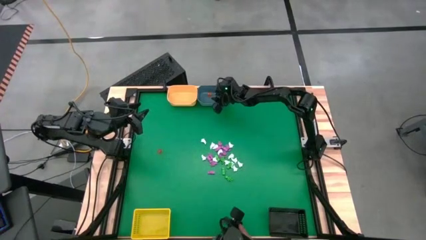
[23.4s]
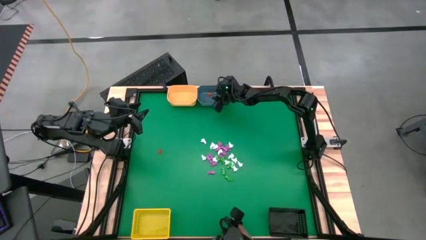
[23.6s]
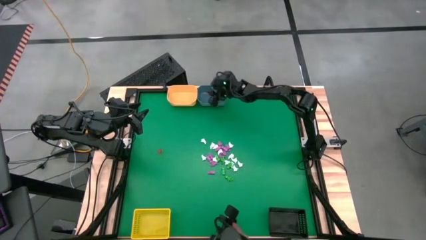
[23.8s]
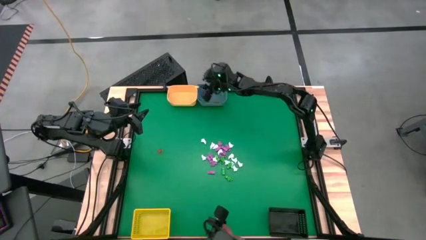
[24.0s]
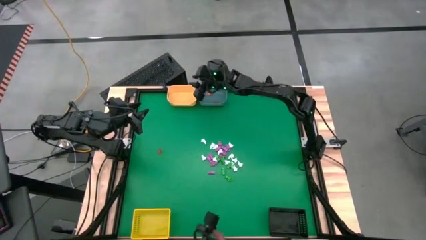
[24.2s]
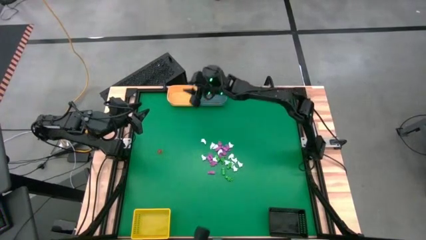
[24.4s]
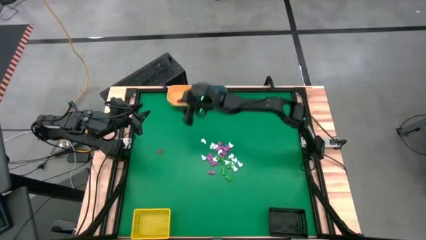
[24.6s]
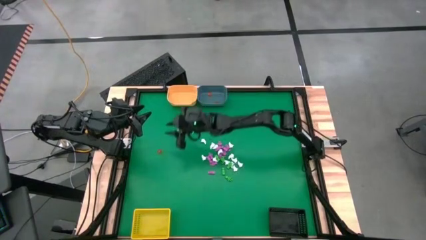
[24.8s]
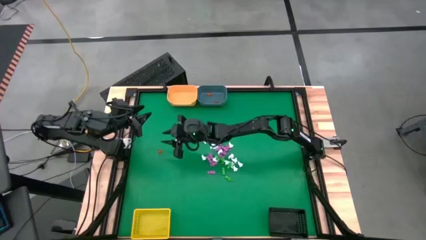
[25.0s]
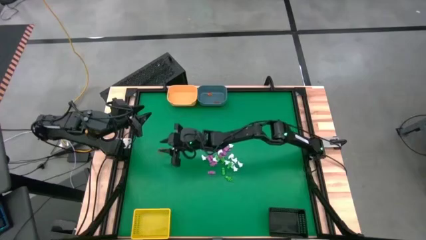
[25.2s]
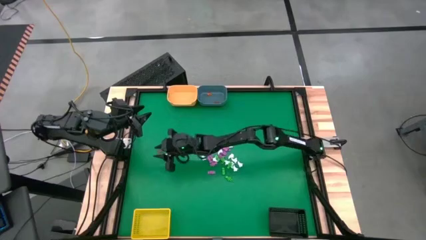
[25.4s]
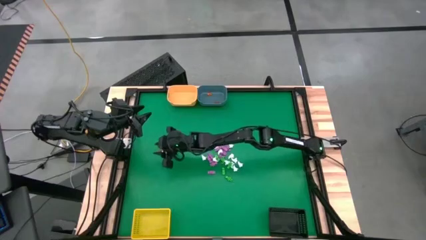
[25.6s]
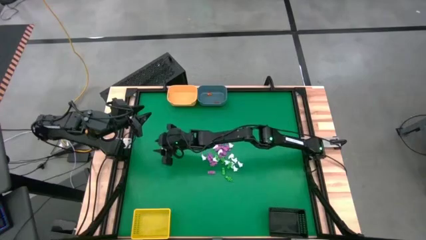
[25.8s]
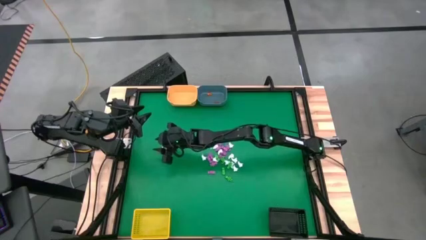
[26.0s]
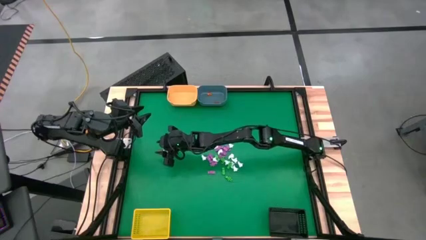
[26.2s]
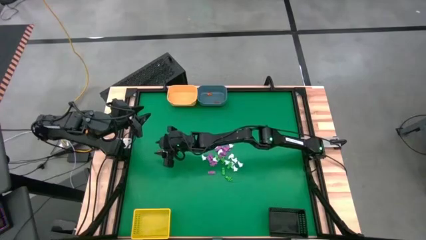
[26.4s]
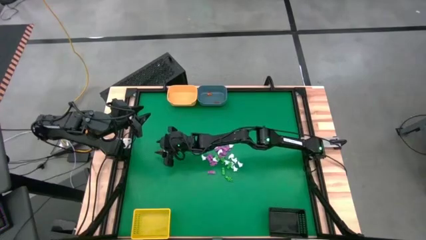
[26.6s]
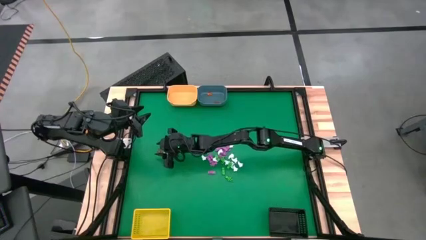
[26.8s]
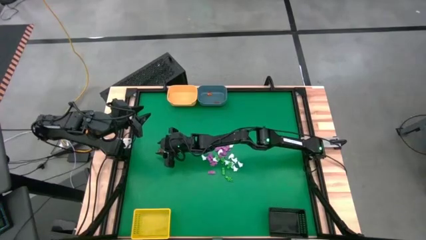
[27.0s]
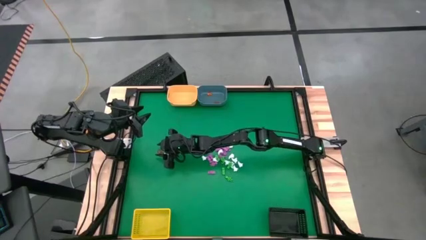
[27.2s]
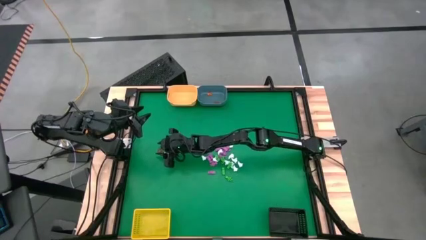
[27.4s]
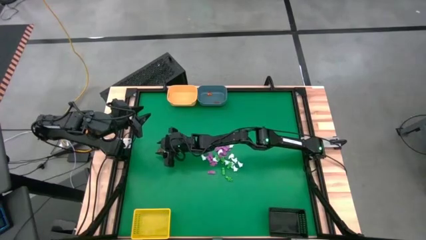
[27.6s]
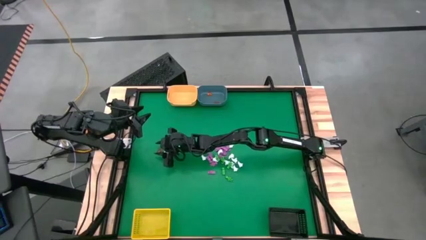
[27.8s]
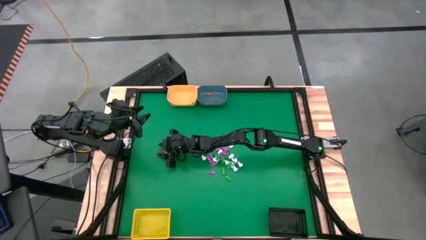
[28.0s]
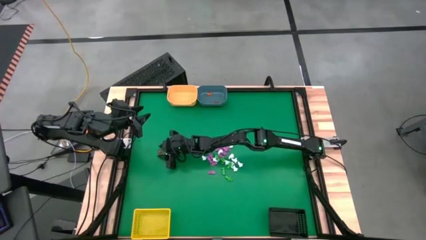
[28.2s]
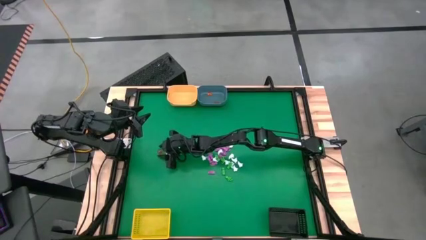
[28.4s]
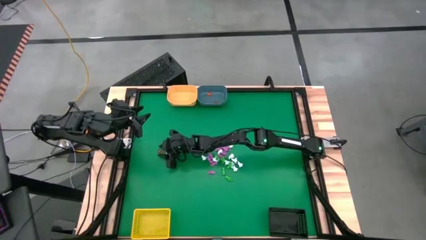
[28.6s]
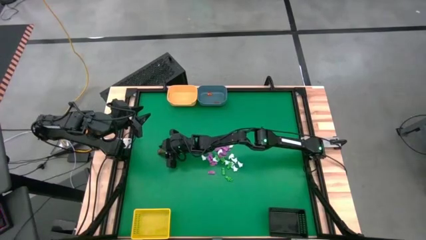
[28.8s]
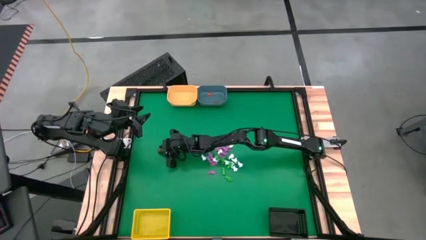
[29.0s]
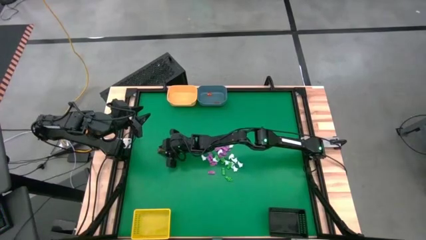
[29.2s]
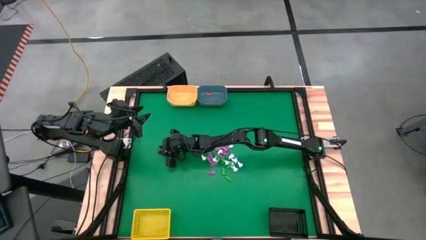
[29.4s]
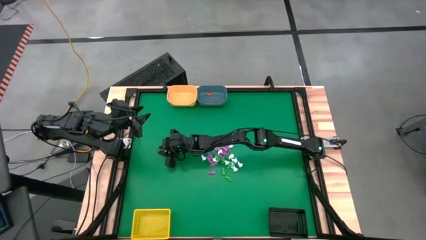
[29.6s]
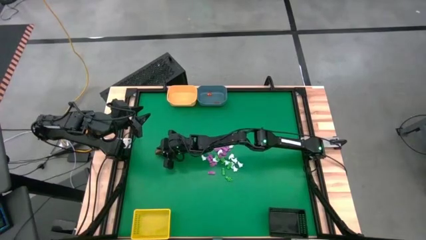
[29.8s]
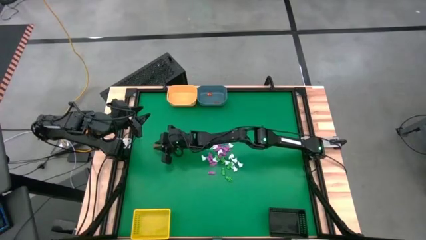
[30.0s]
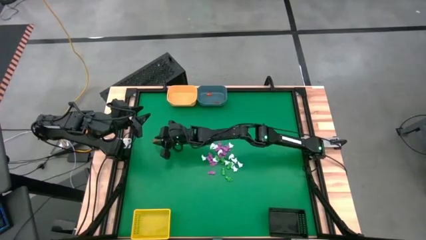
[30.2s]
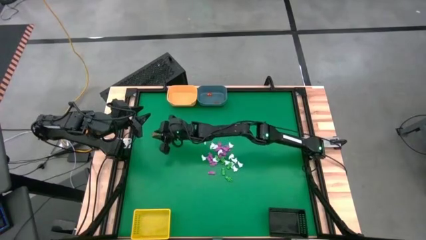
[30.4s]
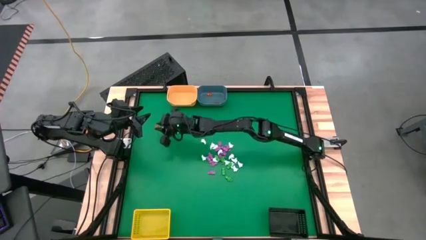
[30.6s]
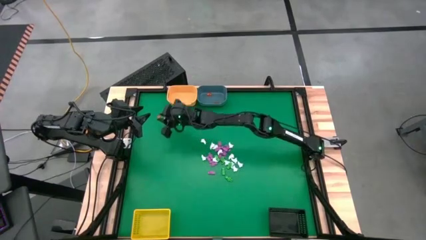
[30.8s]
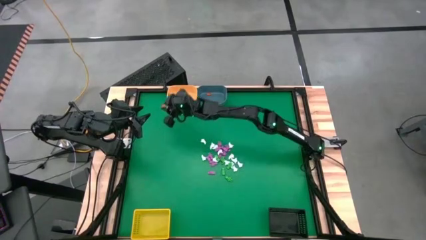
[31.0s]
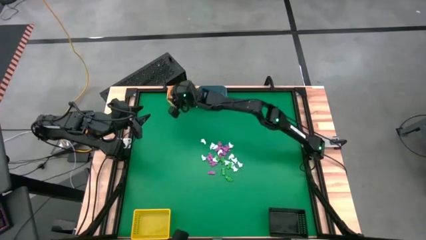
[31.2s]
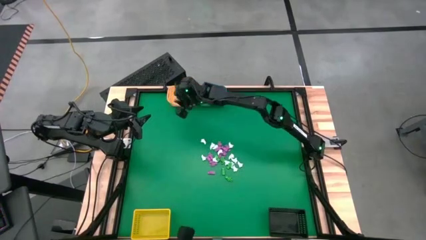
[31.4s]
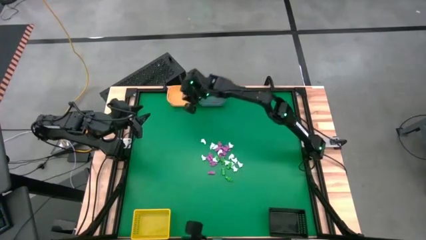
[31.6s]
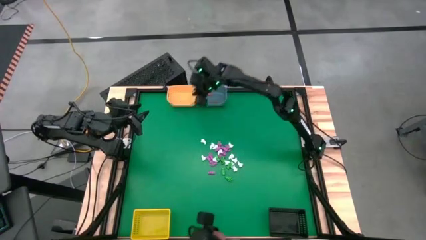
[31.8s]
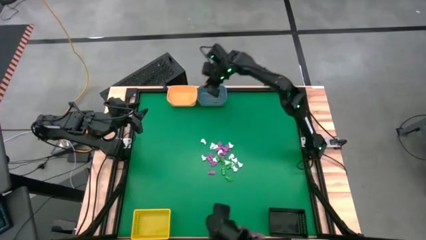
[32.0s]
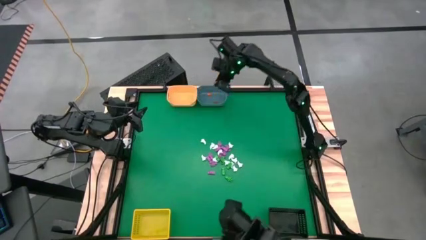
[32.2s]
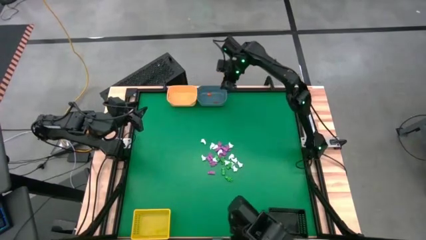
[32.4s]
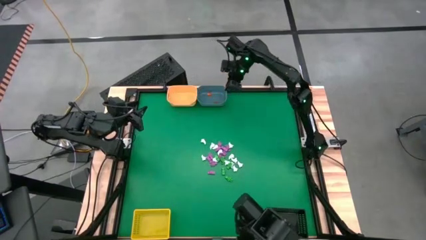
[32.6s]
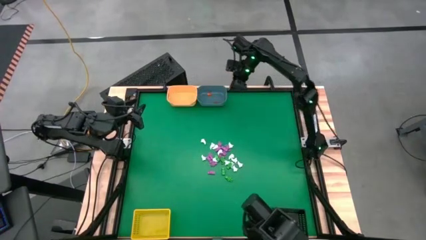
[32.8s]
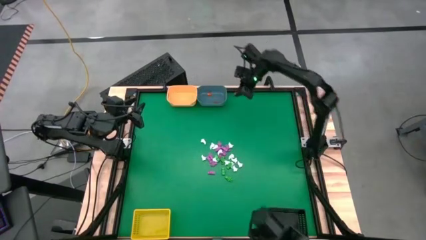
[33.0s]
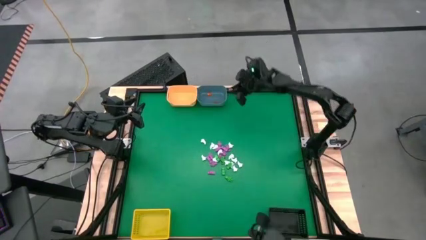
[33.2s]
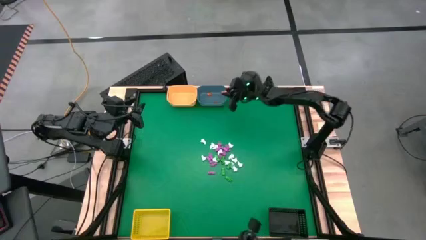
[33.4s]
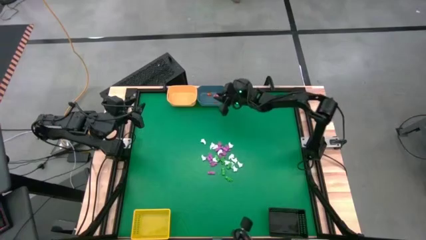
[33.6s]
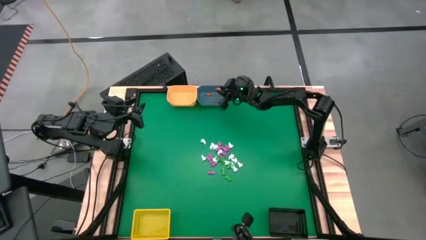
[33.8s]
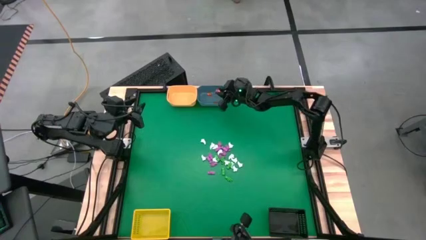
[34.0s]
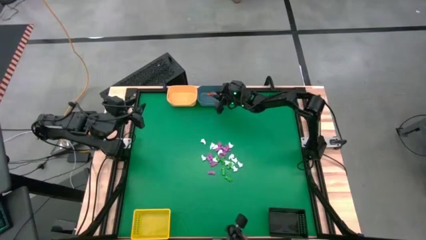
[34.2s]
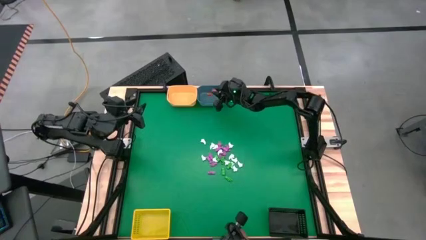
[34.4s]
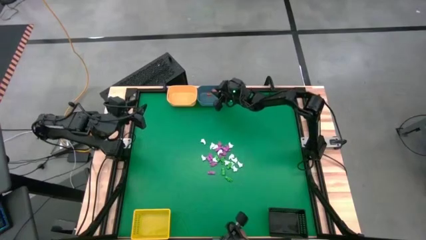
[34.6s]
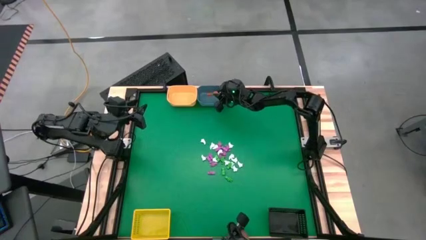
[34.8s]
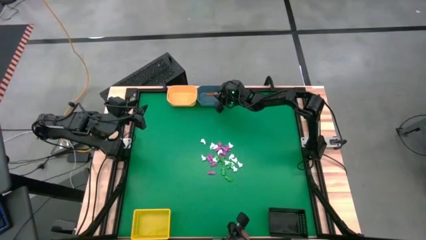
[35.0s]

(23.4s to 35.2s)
Task: Sort Halloween decoration
Put the orange pumpkin into the gray bin
